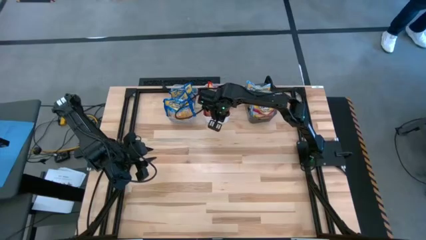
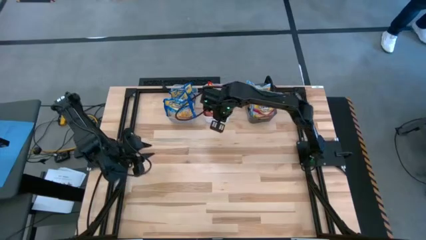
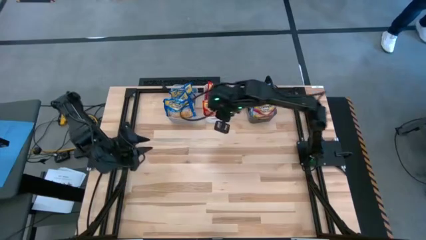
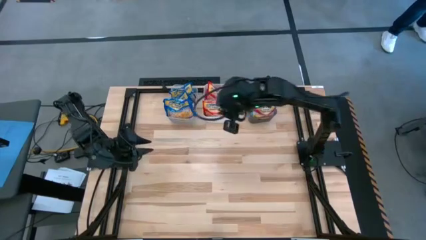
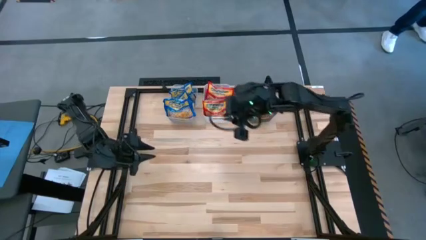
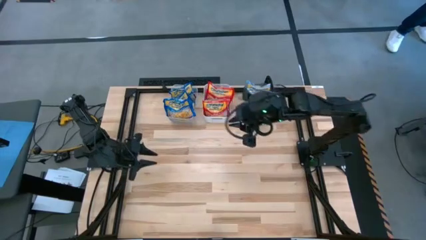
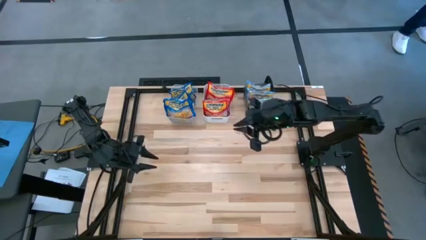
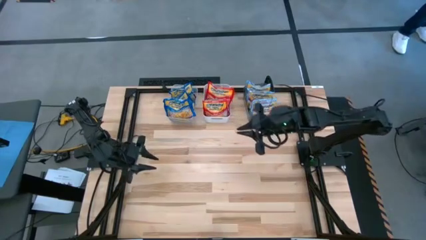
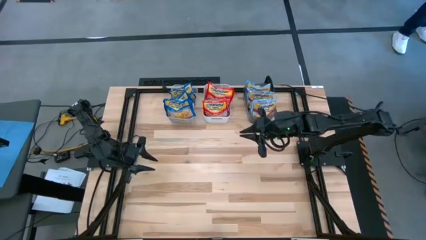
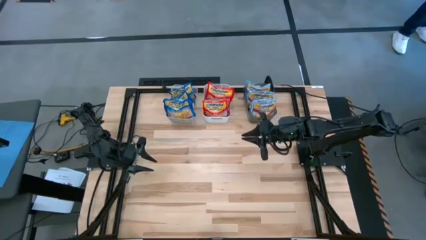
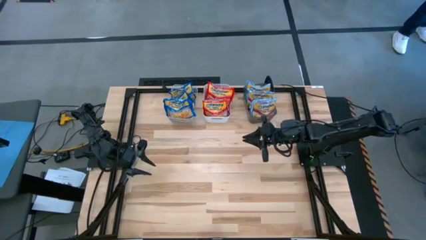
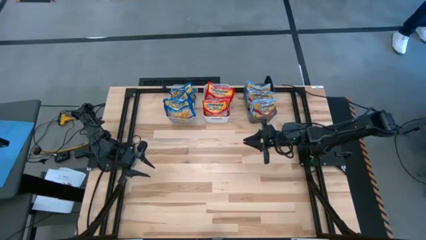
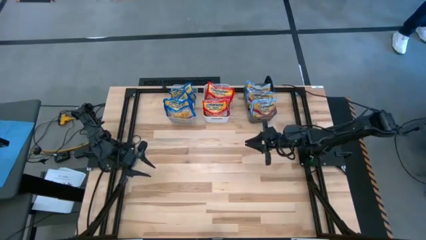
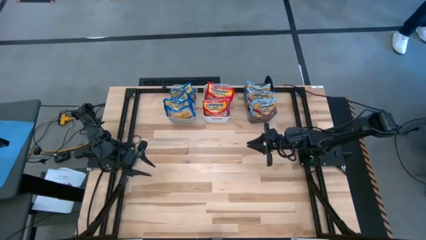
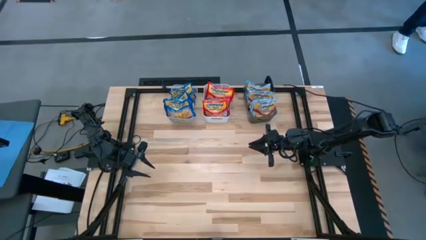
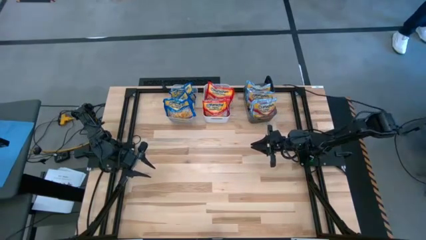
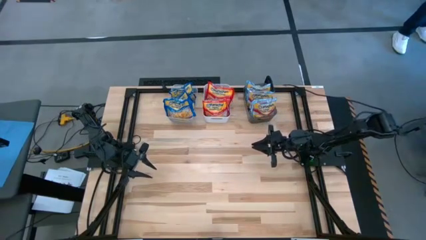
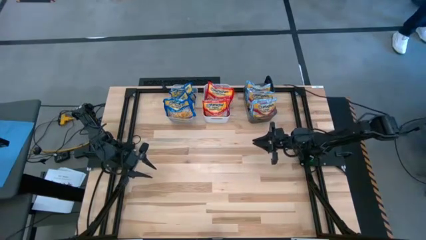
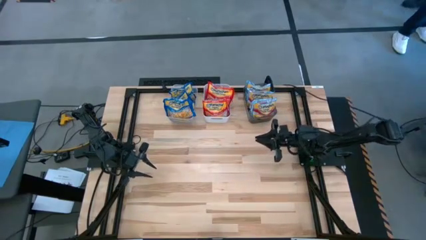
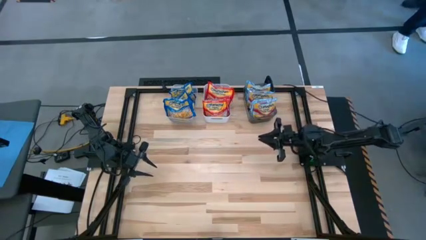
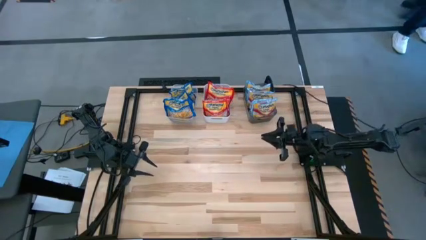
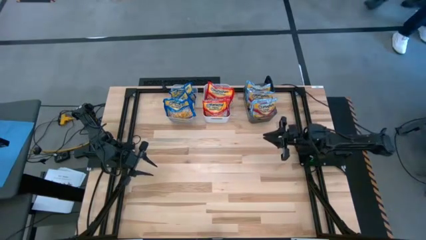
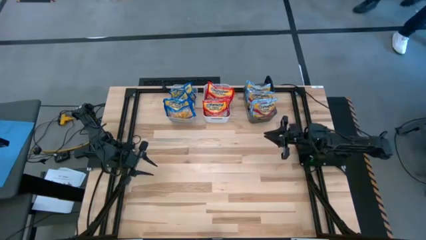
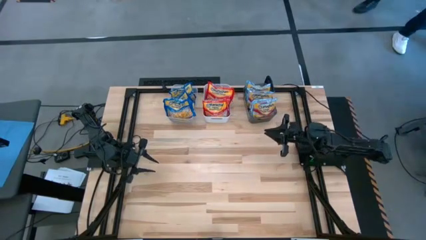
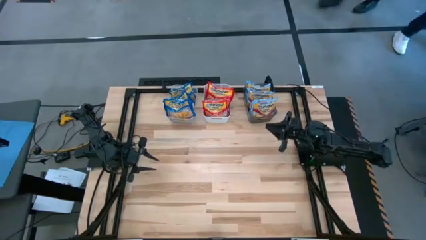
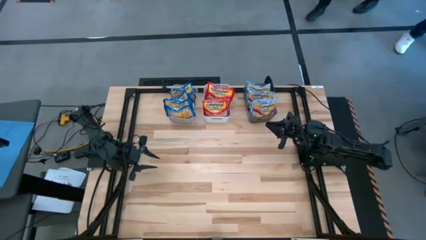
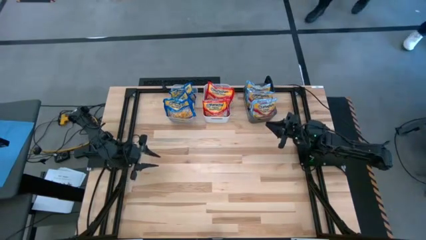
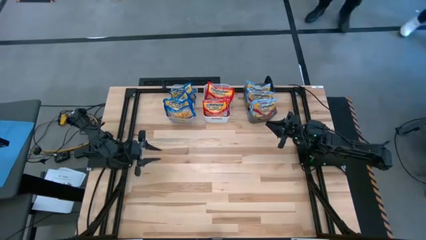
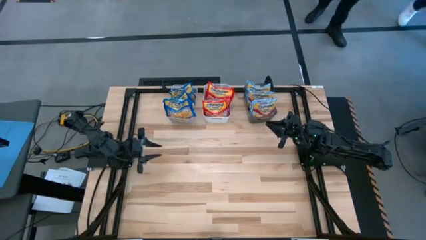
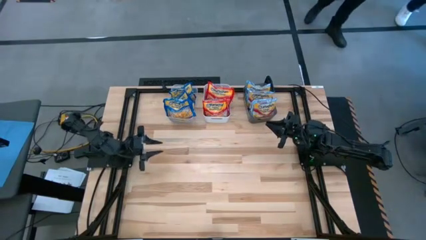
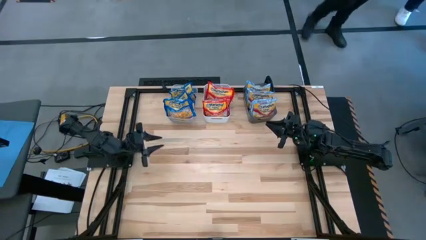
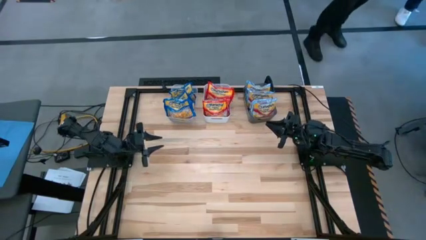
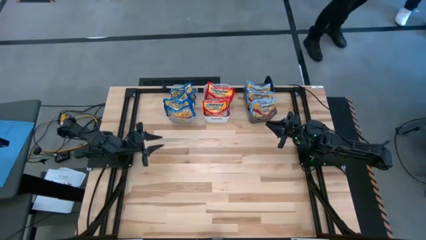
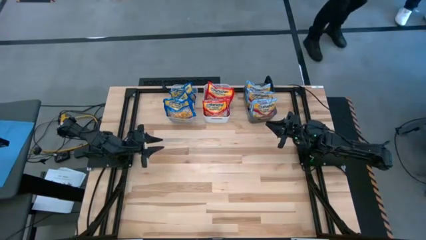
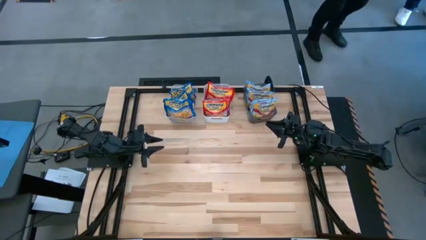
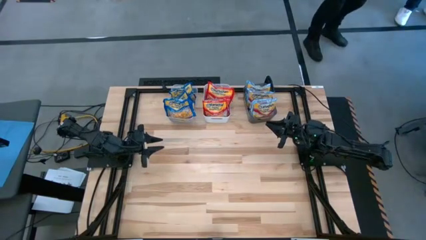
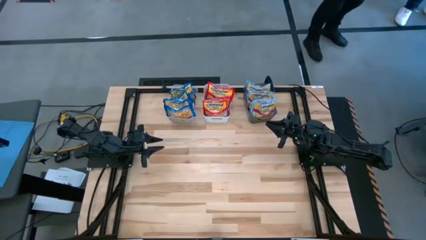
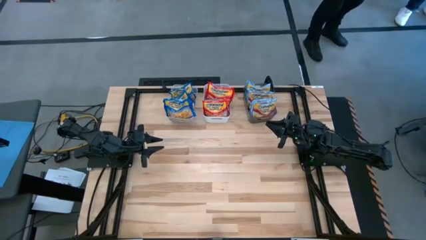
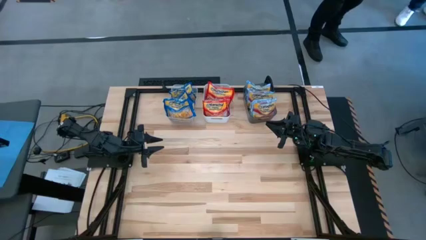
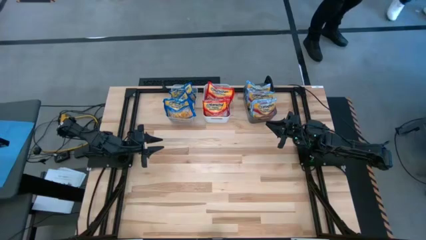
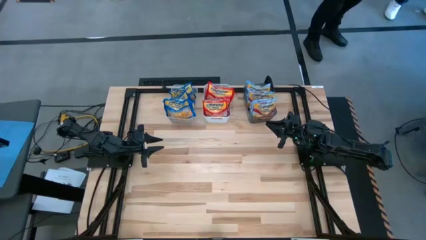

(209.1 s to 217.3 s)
Task: Sort Maruchan noodles
Return to Home Position

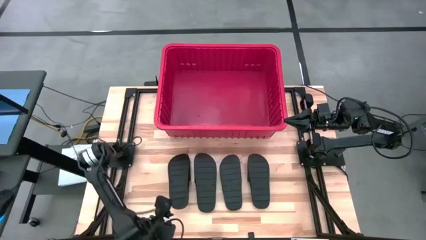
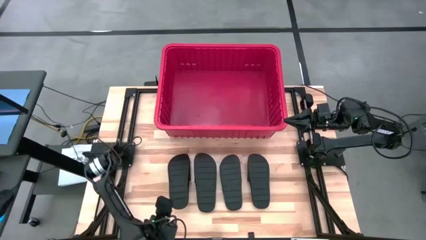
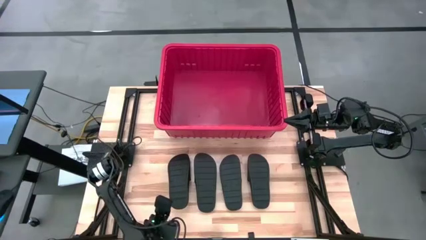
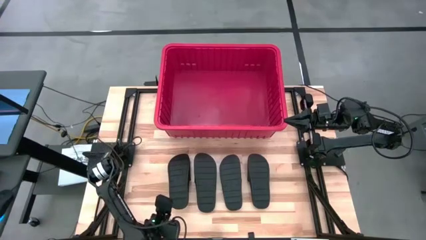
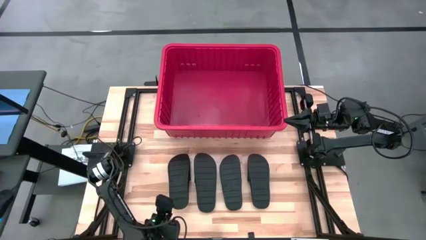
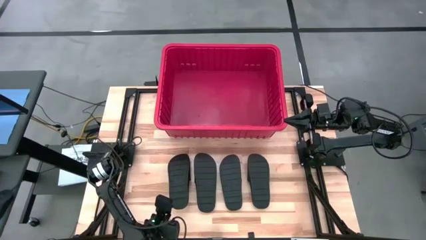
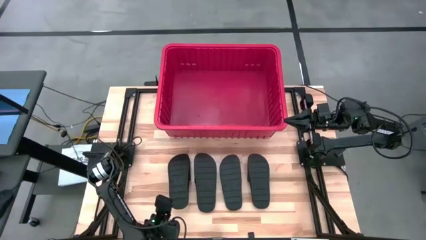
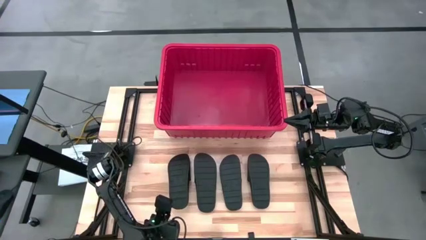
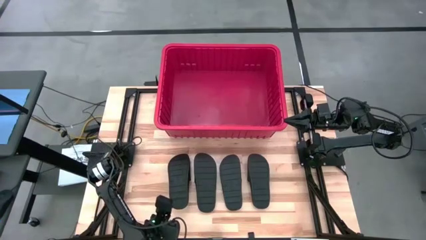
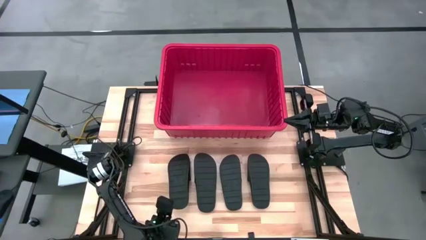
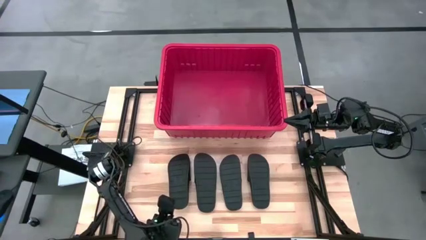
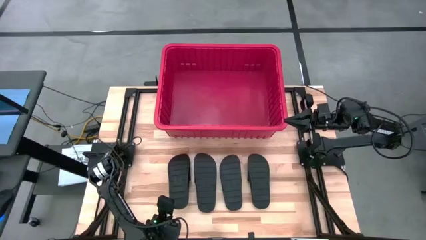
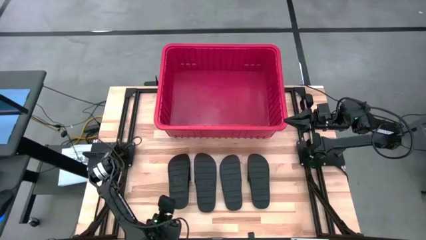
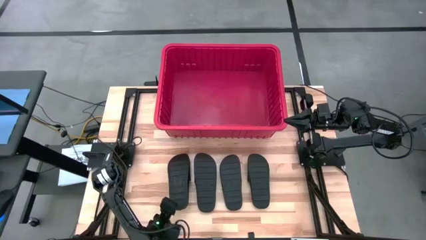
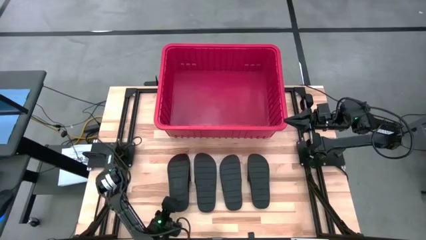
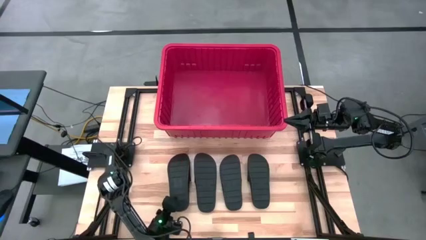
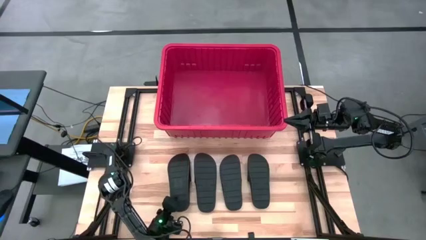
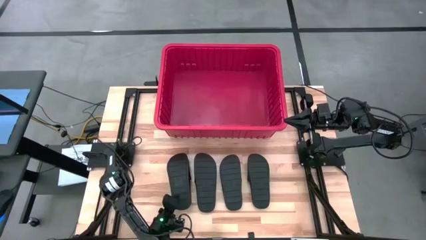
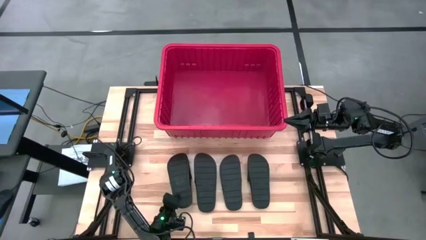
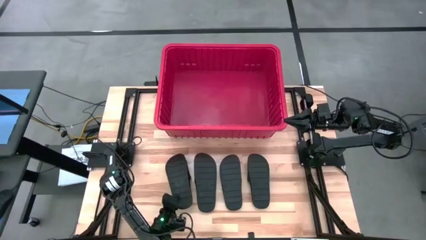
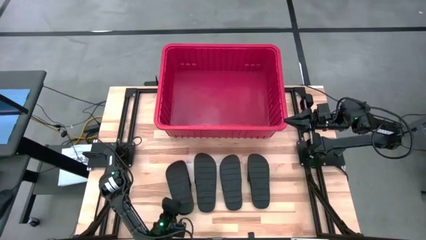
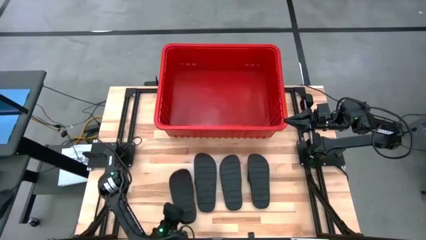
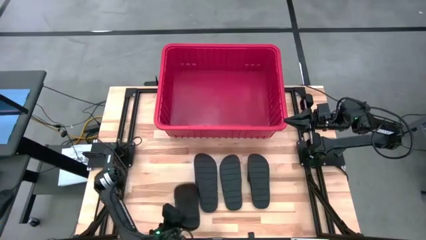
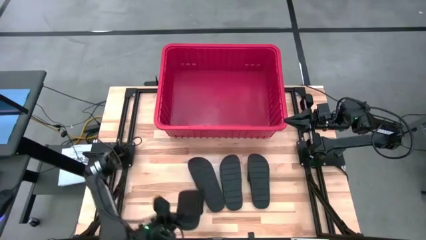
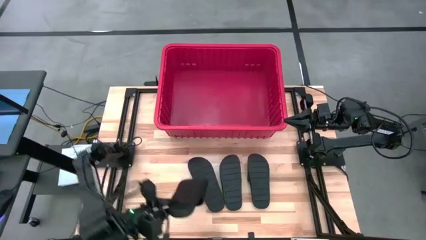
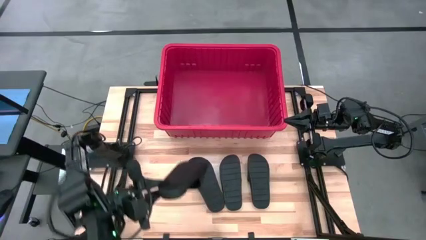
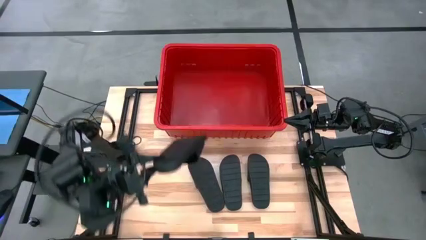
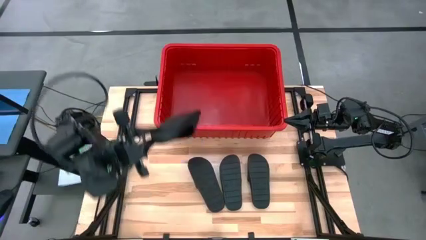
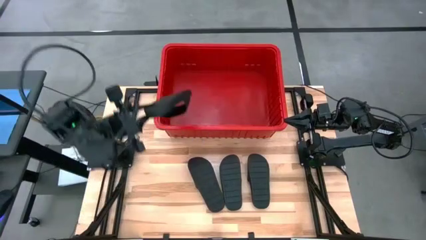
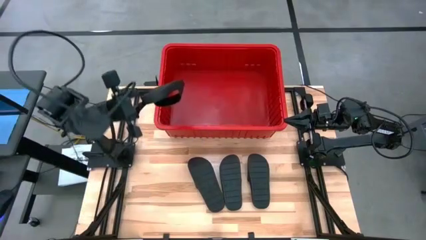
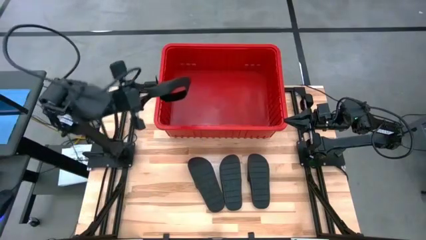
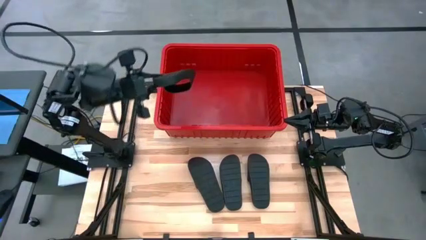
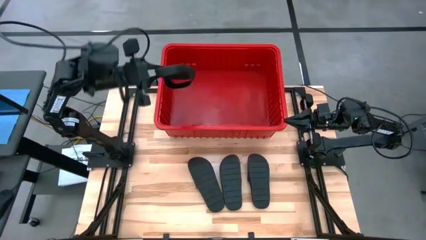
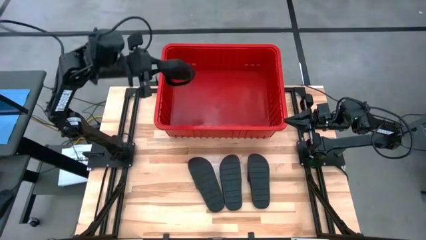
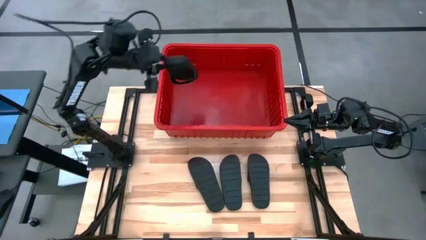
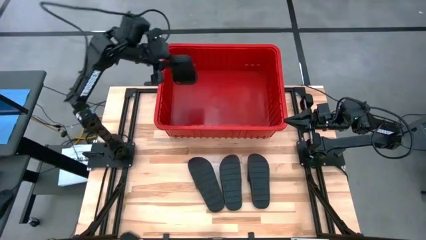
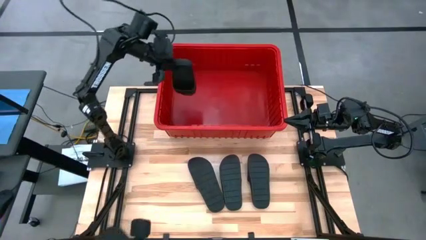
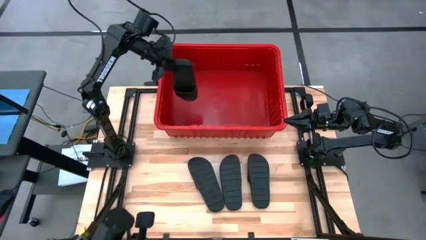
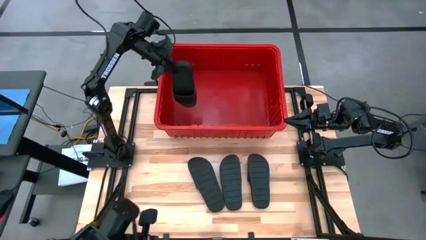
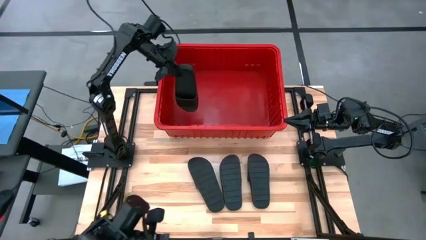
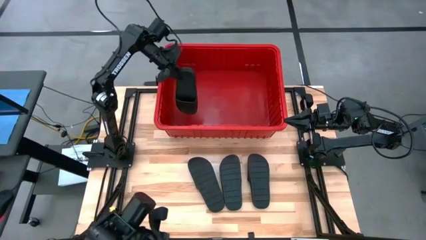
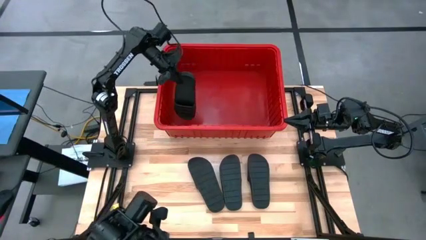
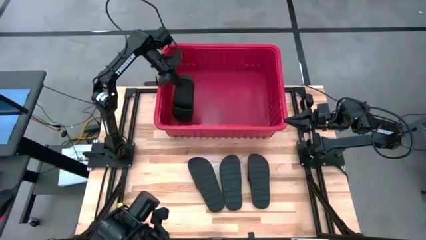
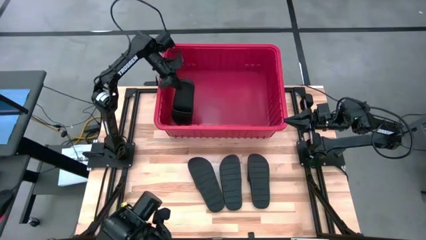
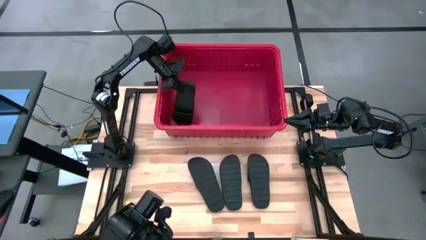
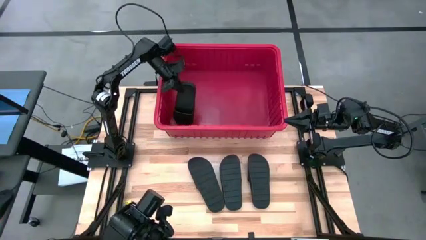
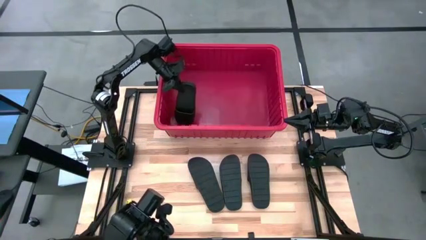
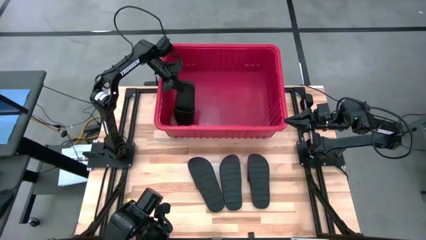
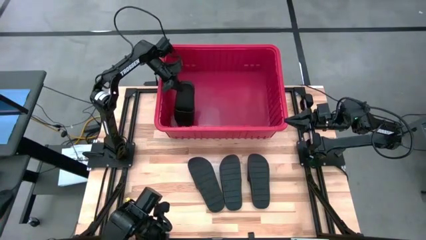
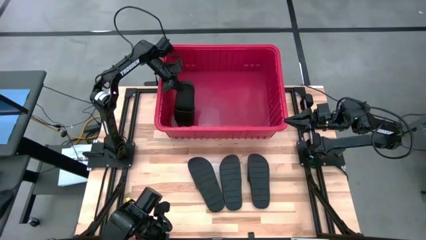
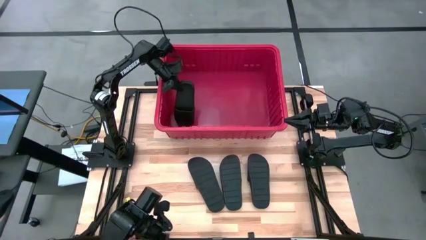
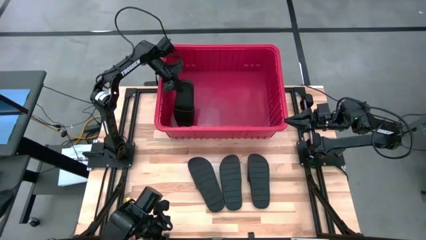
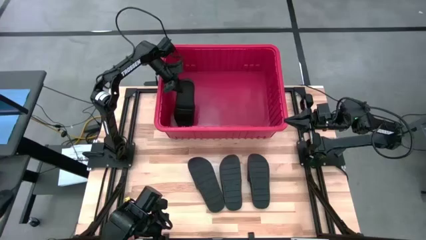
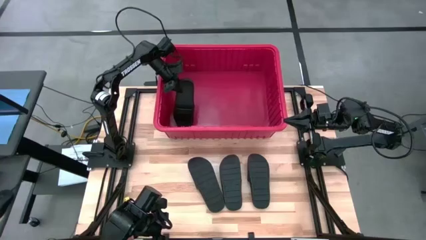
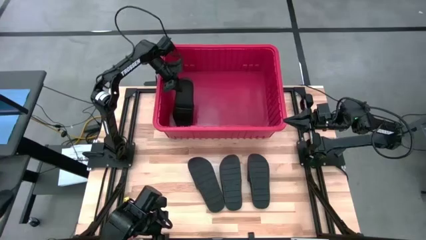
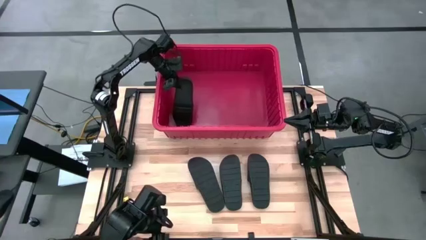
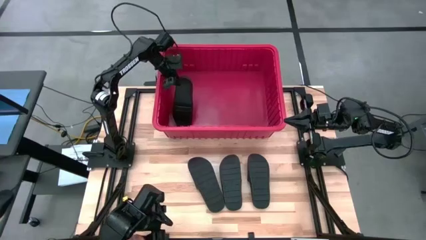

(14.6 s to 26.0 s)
Task: Pick and place slides into bin
Put the black slide into the red bin
